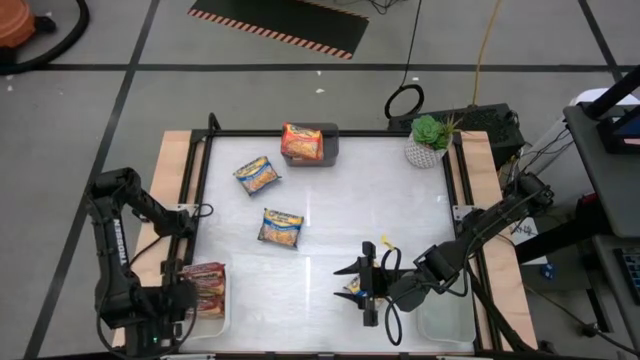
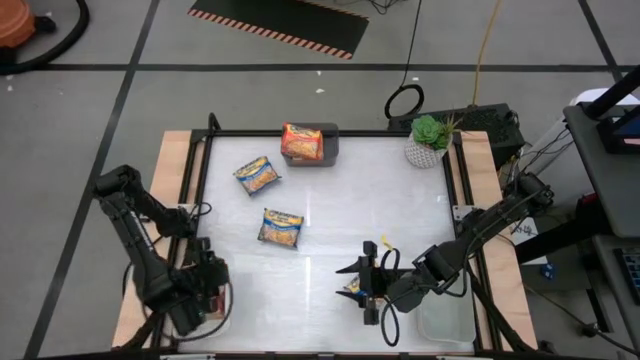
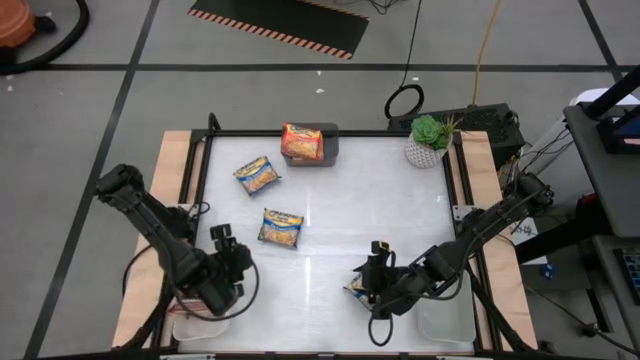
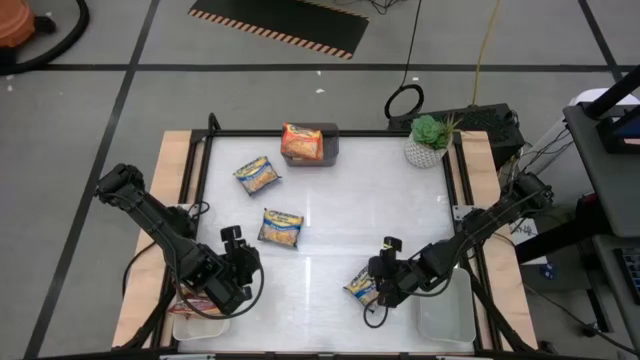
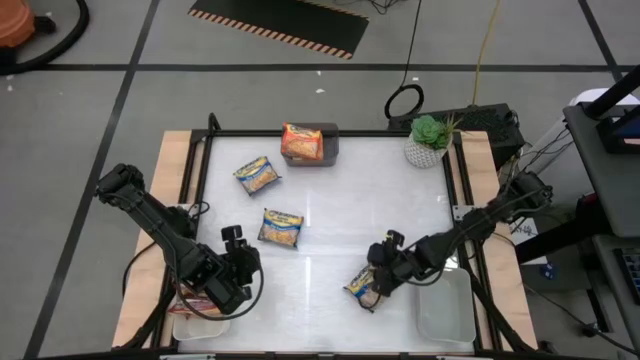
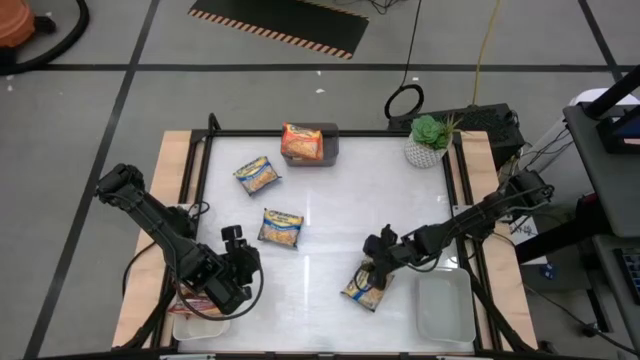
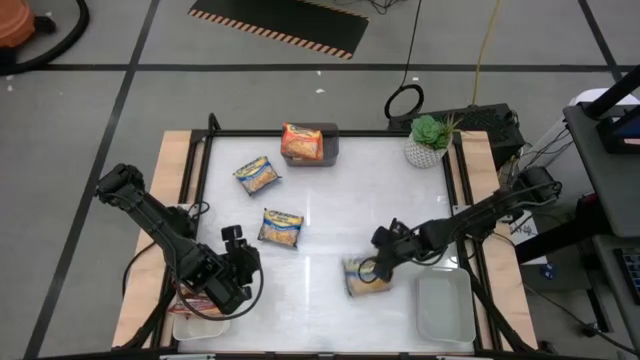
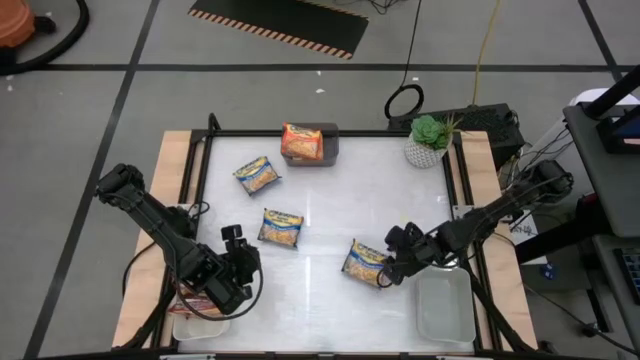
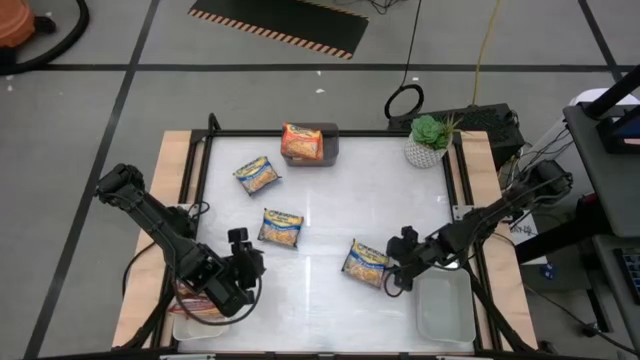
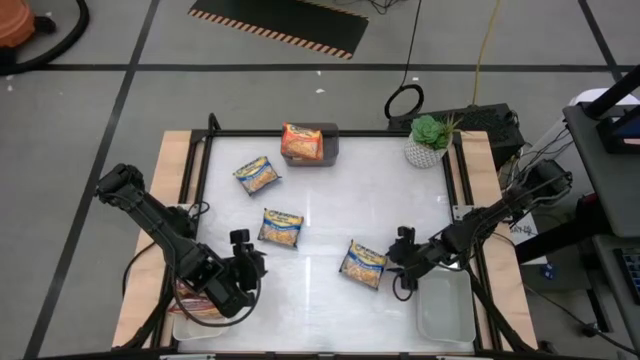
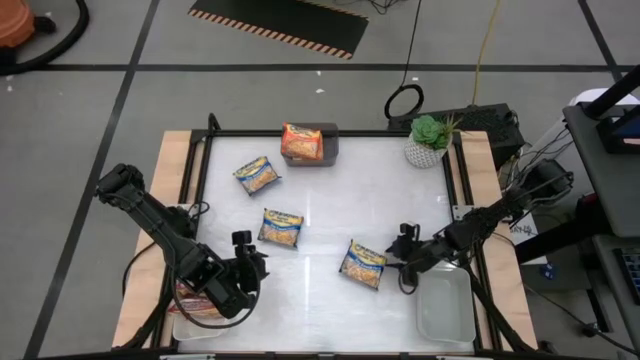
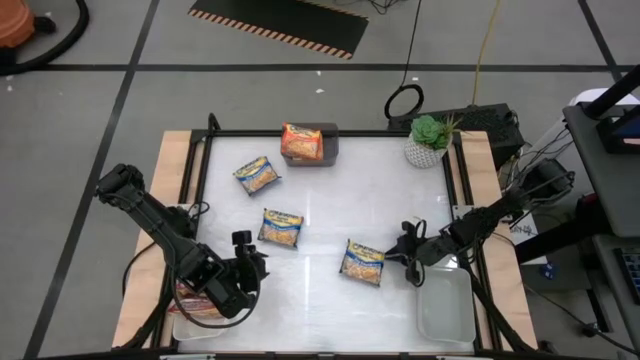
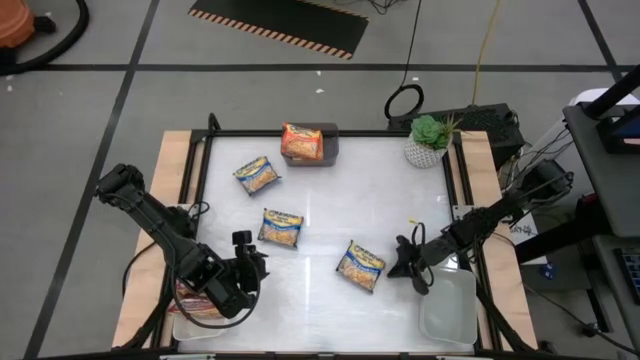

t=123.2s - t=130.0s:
Task: Sort Maruchan noodles
Put the bottom blue noodle pack into the gray bin

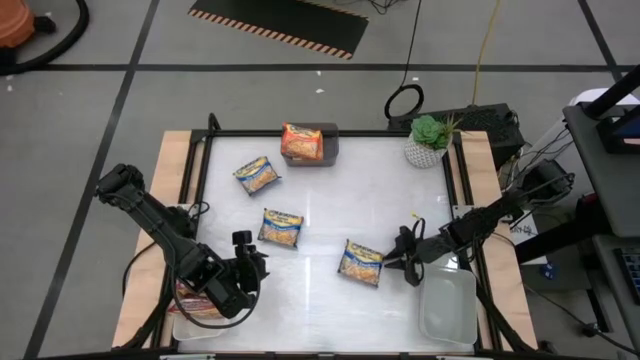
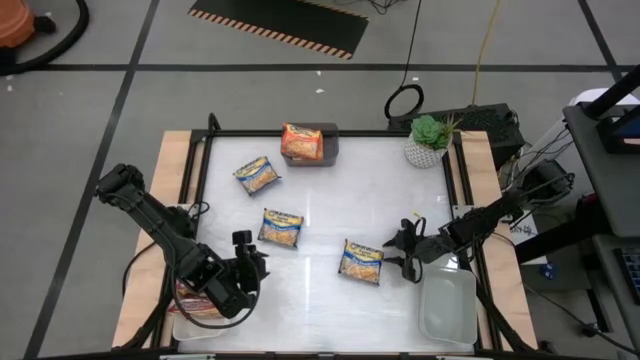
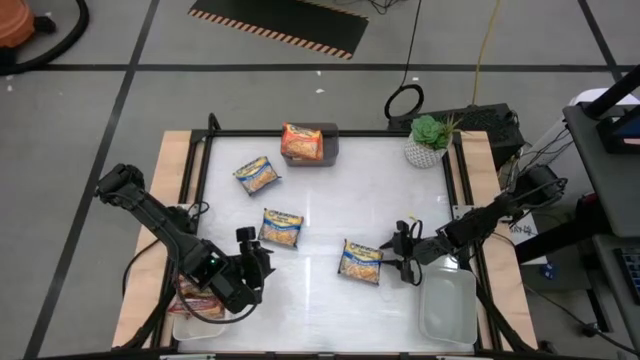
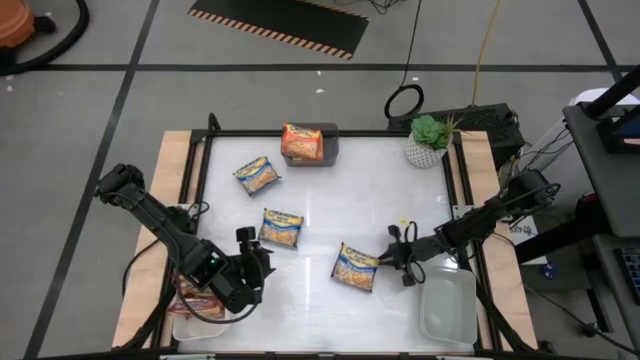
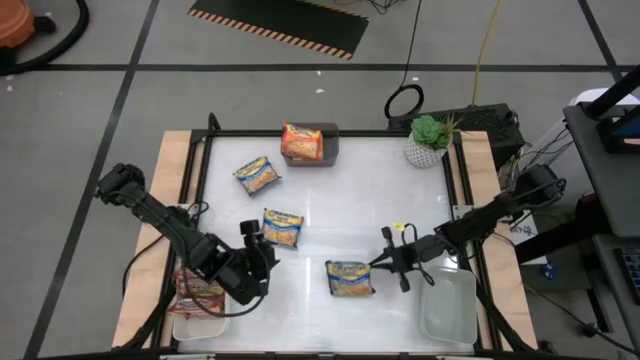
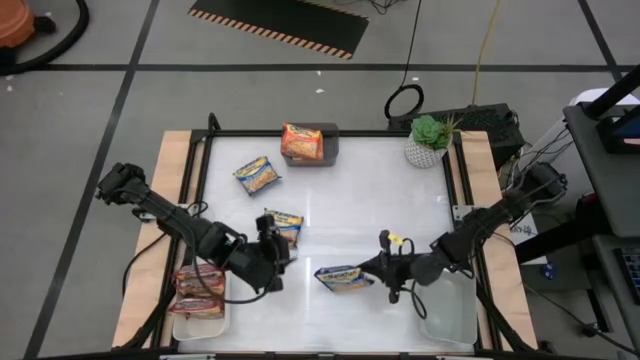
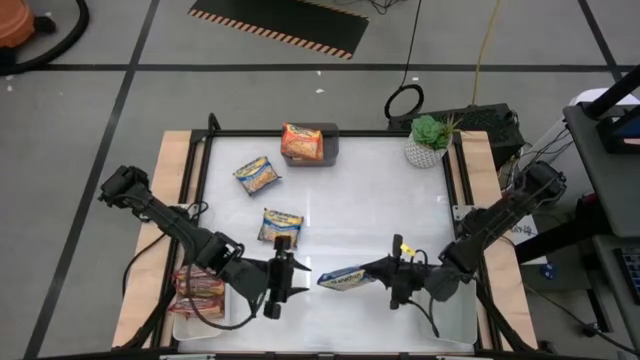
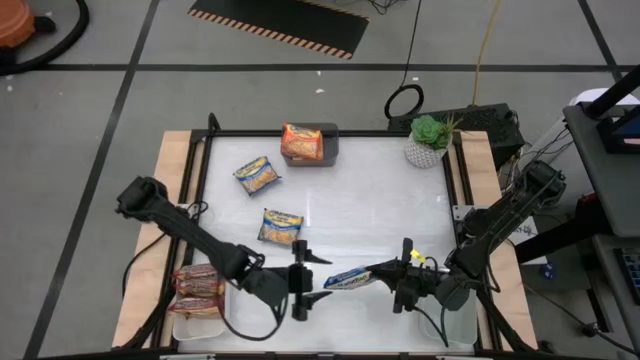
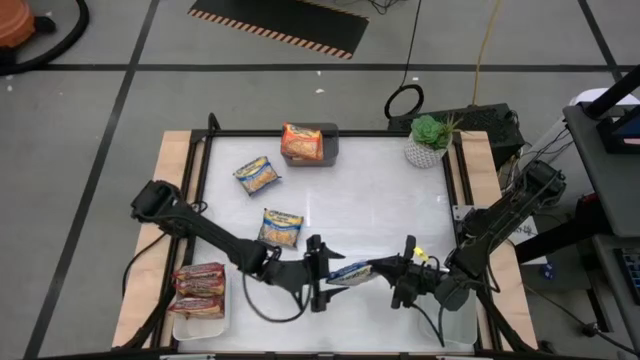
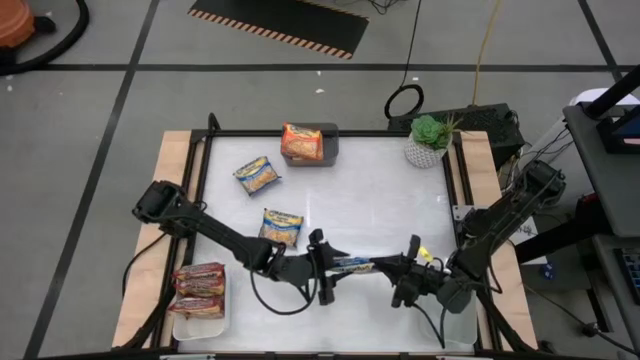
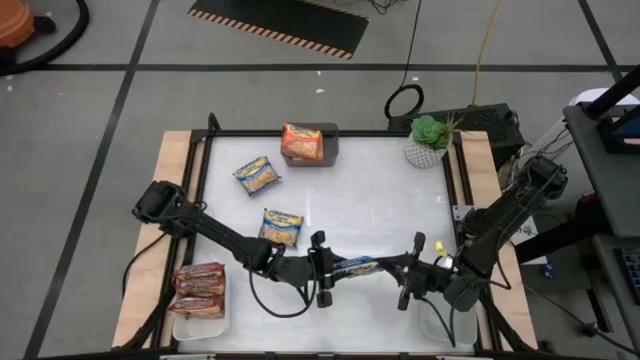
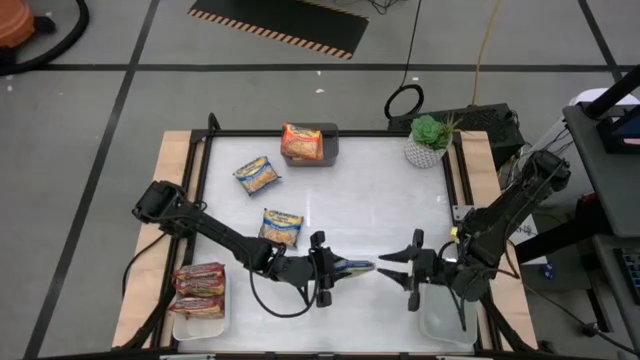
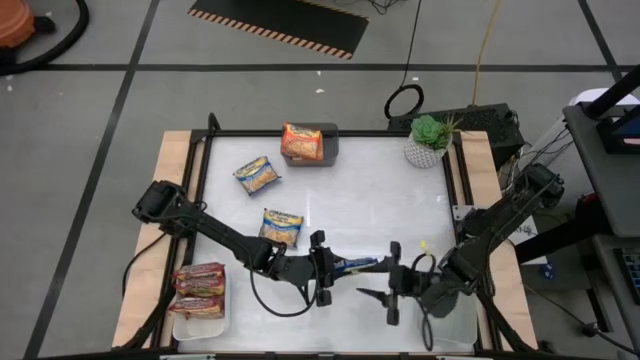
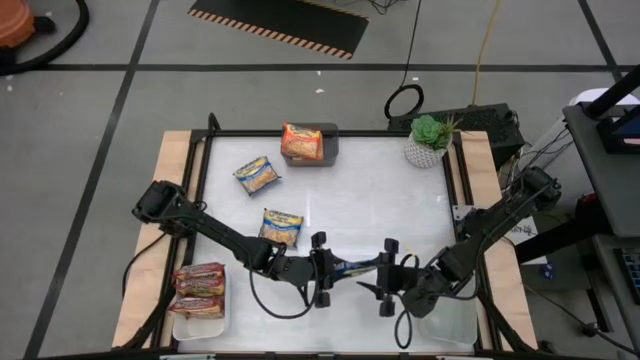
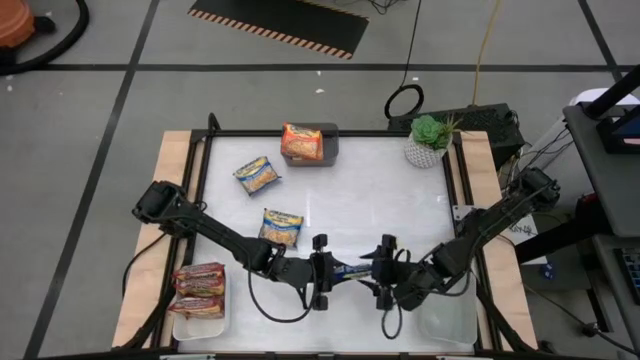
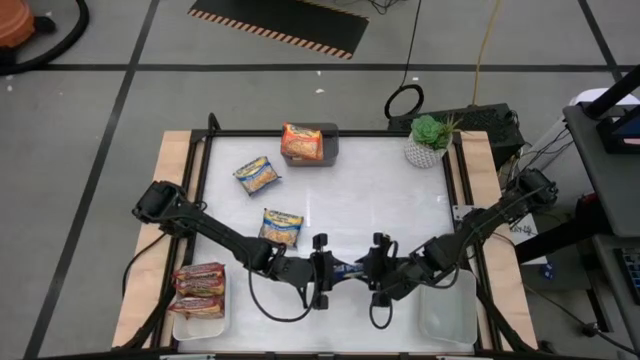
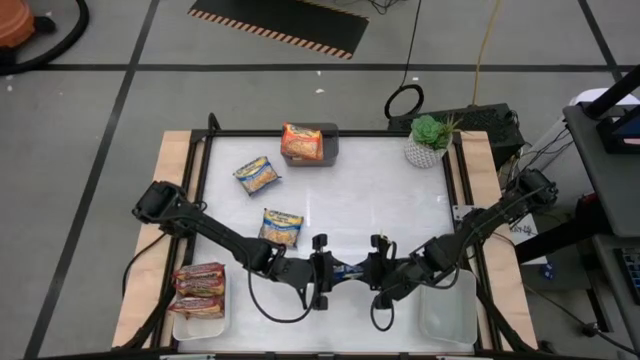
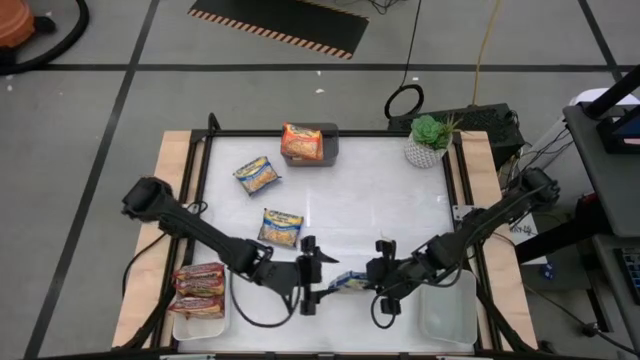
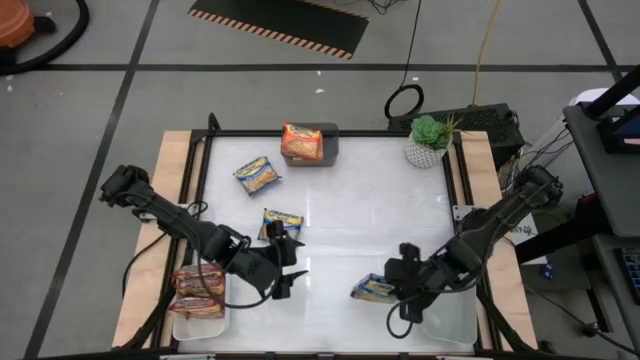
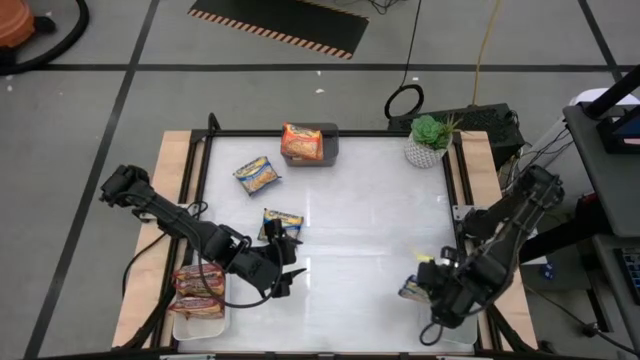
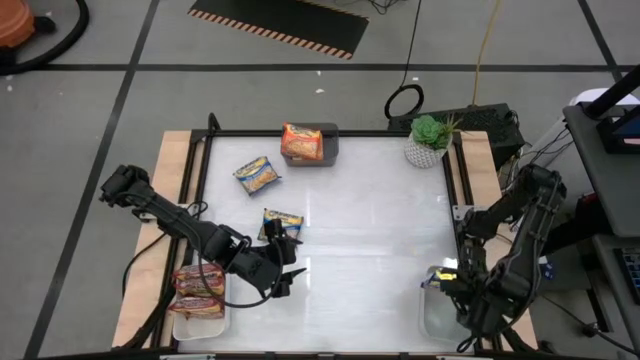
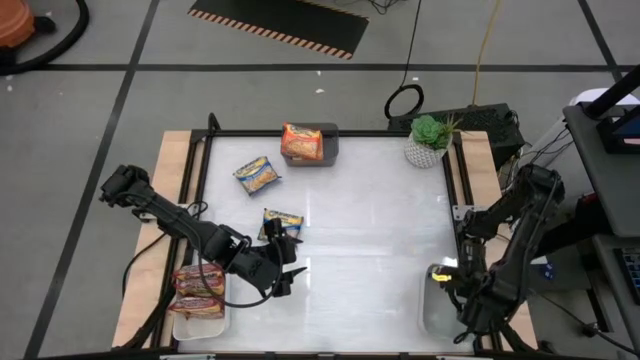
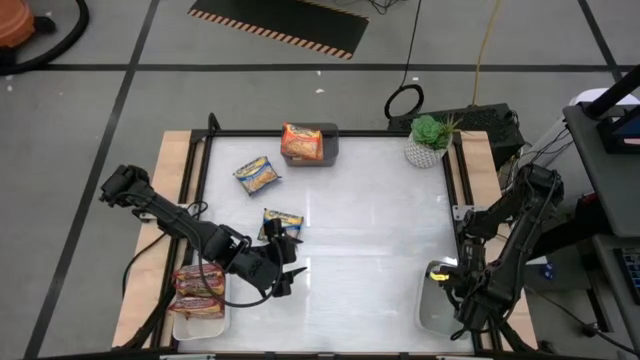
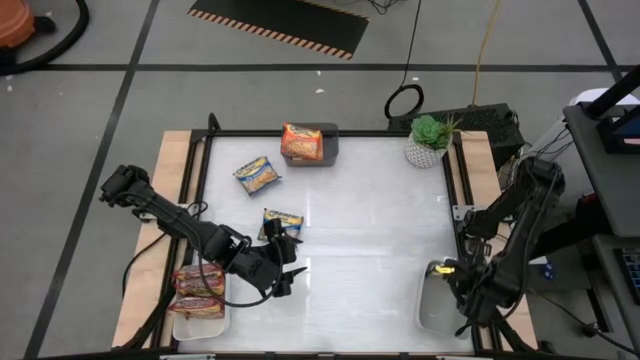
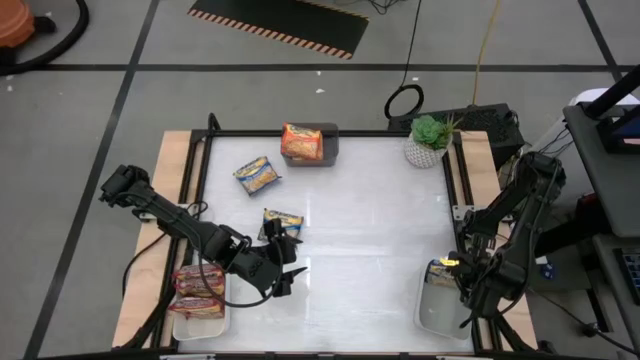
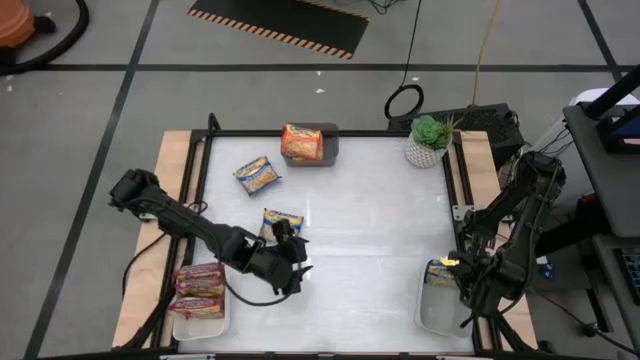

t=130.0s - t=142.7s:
Put the bottom blue noodle pack into the gray bin

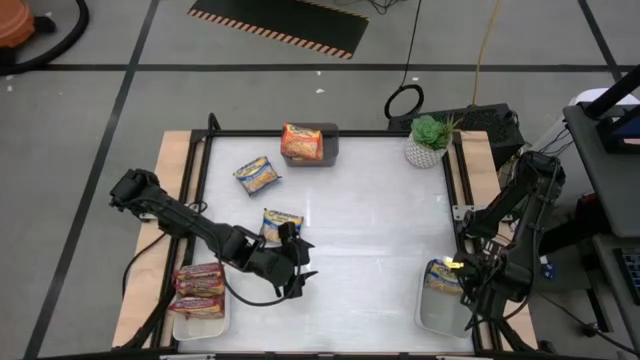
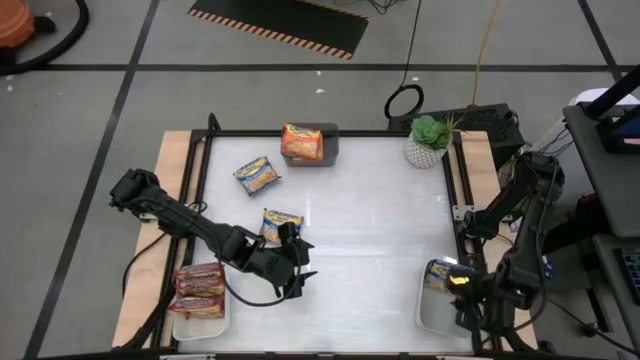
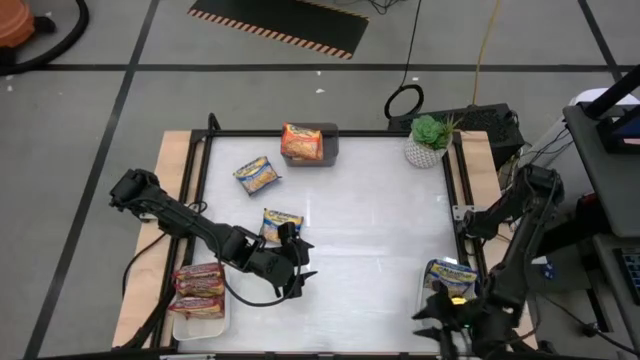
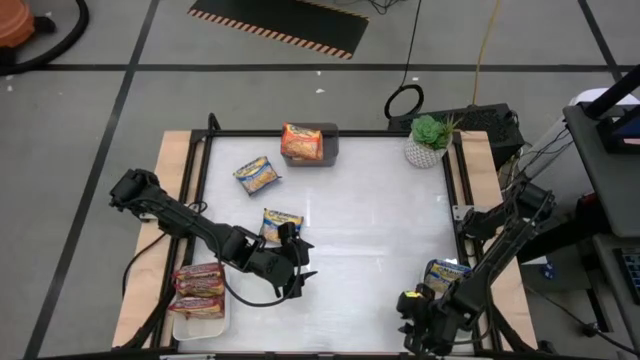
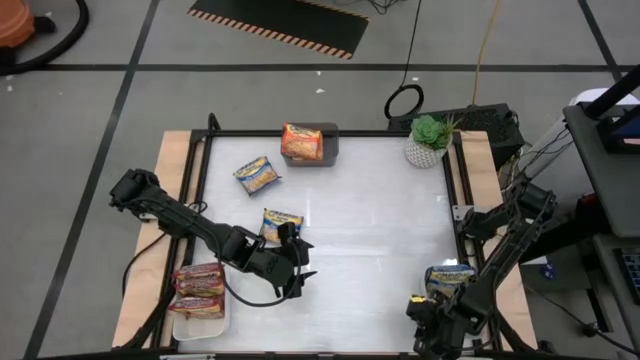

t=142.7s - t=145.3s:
Adjust the gray bin
